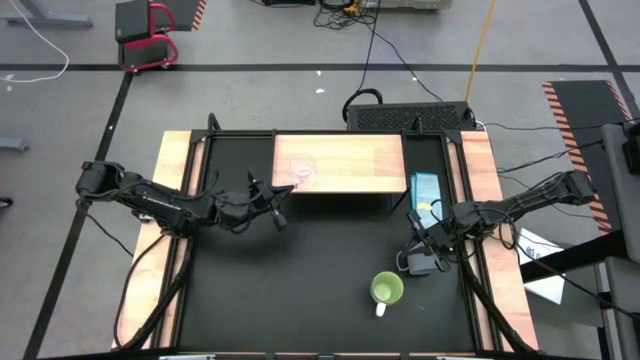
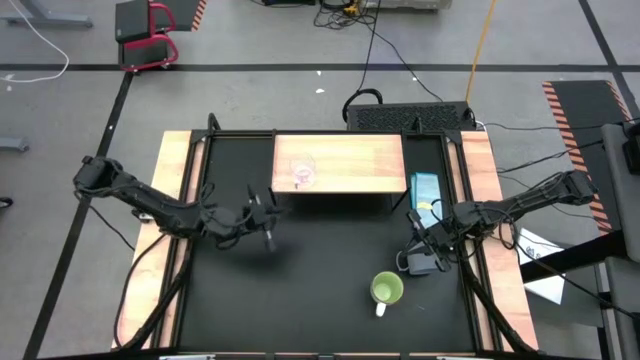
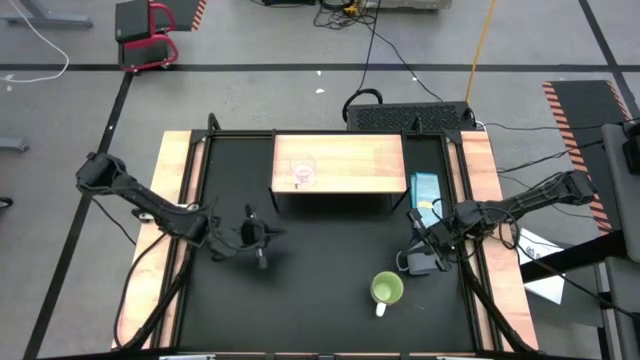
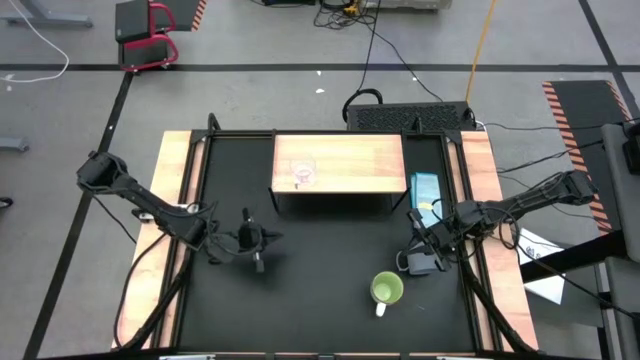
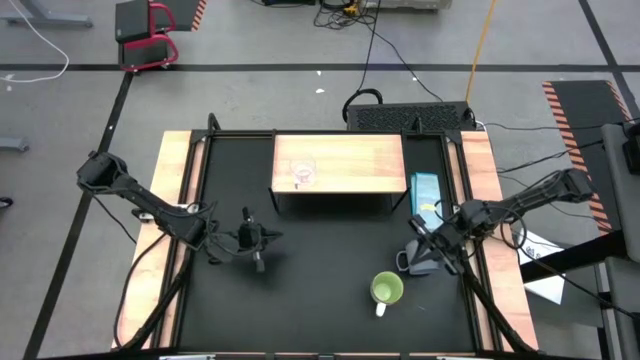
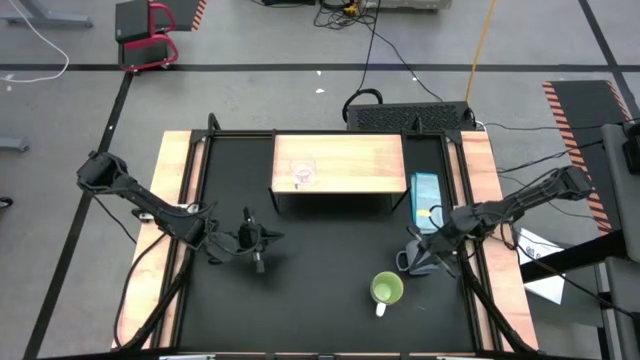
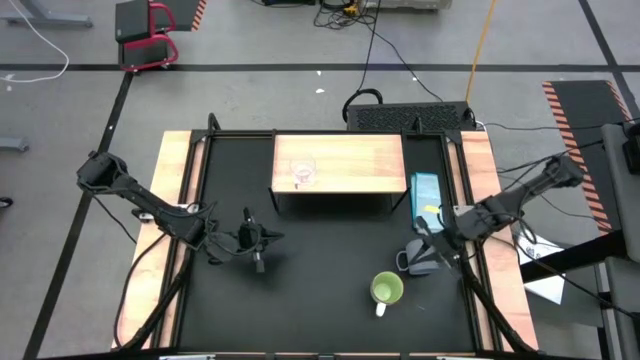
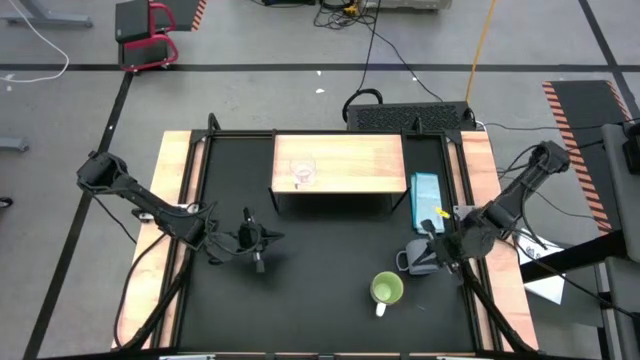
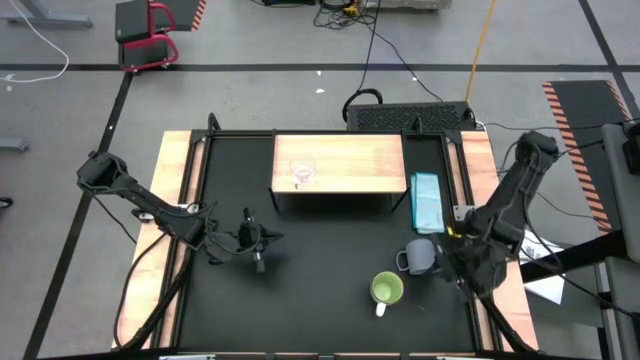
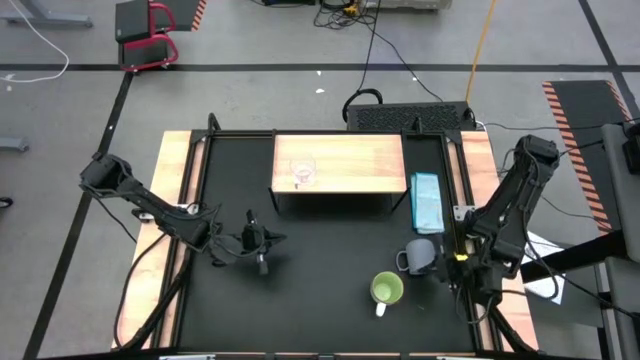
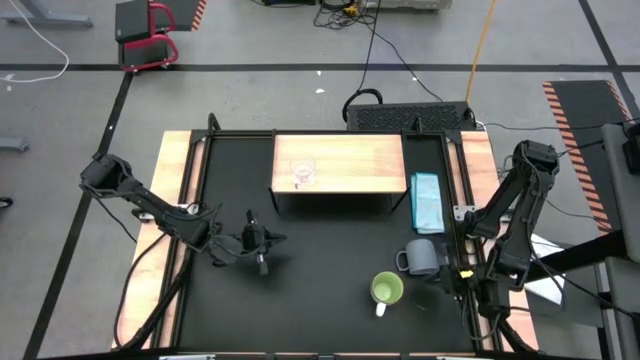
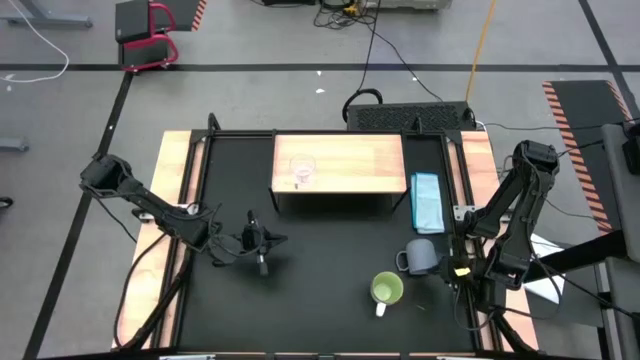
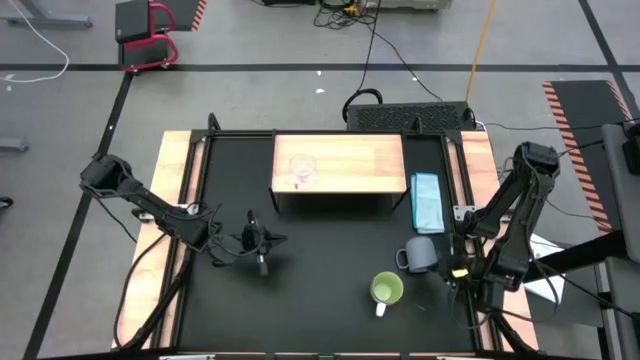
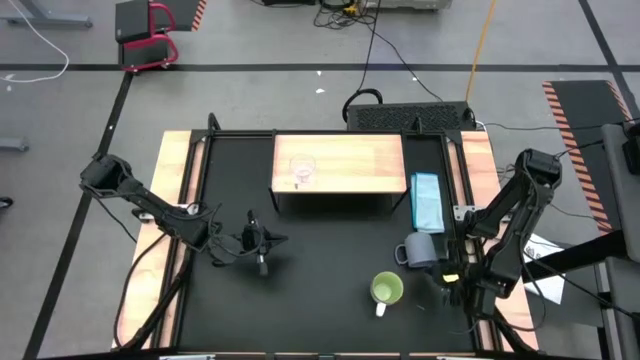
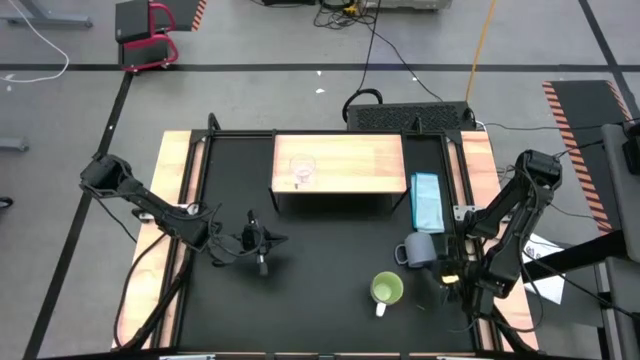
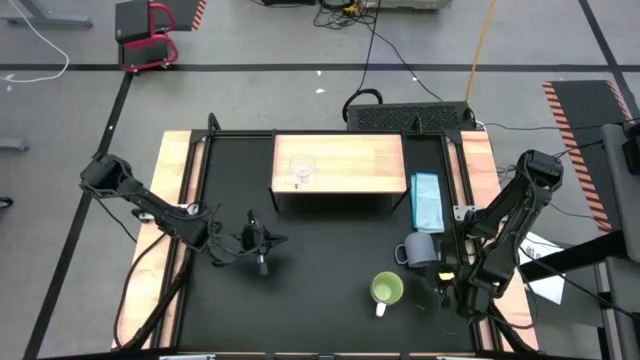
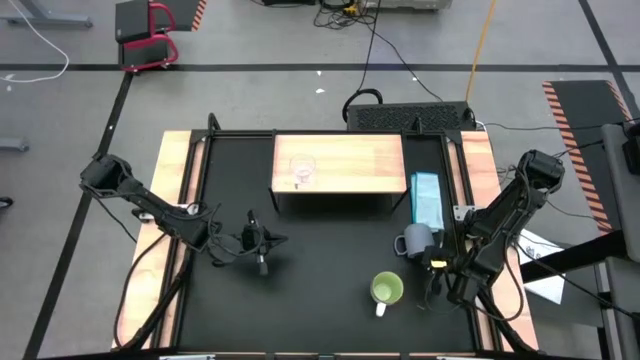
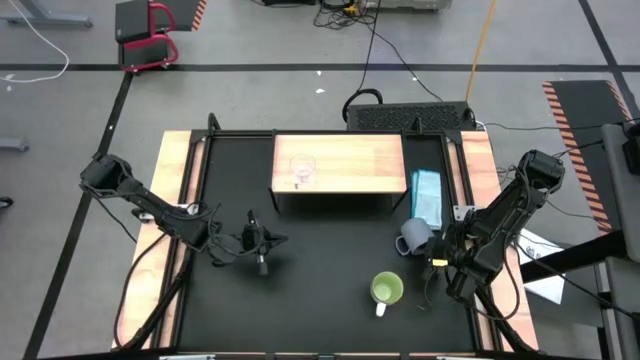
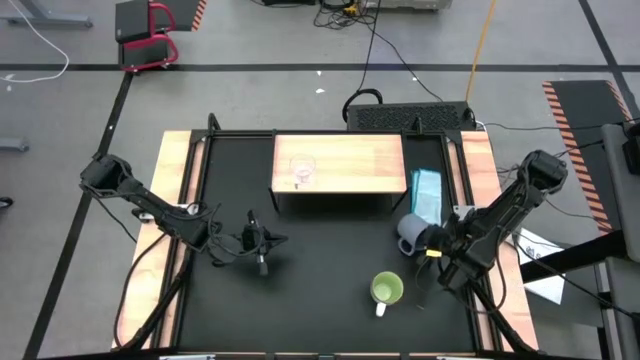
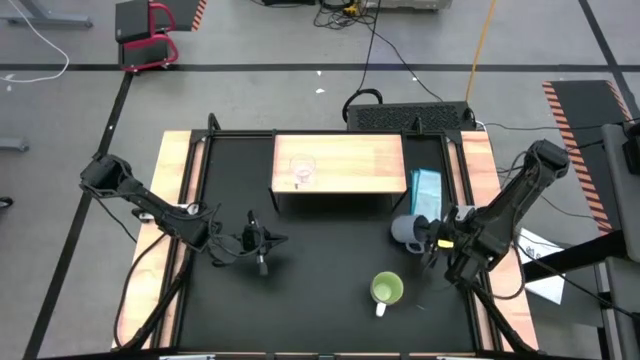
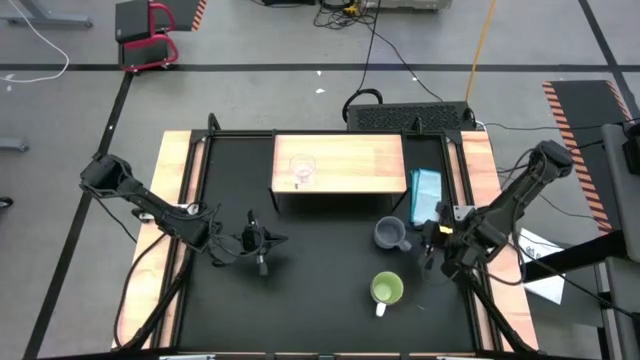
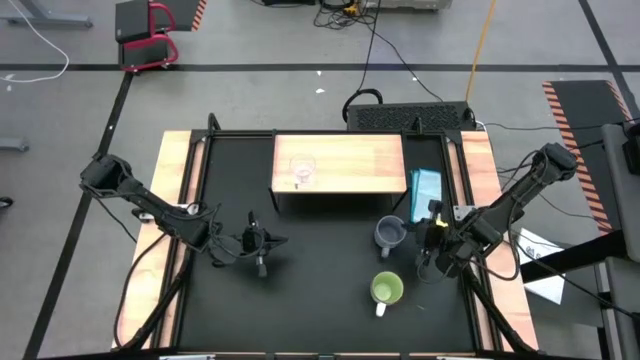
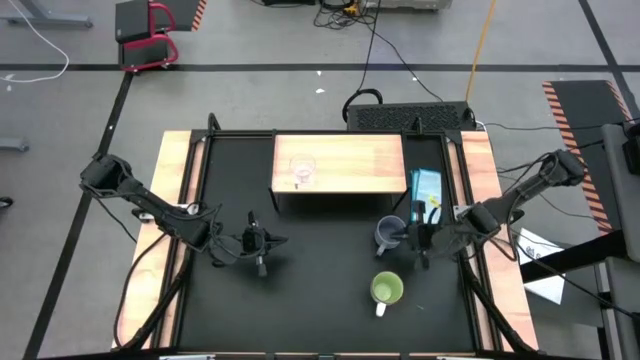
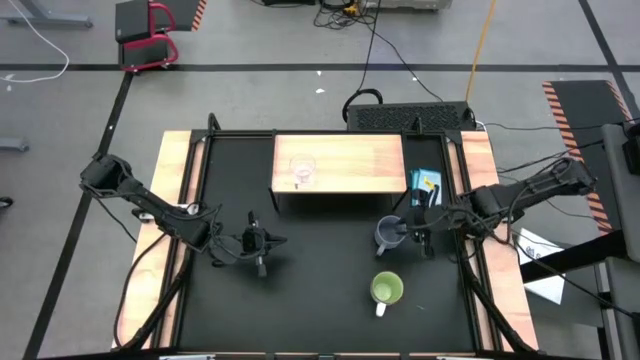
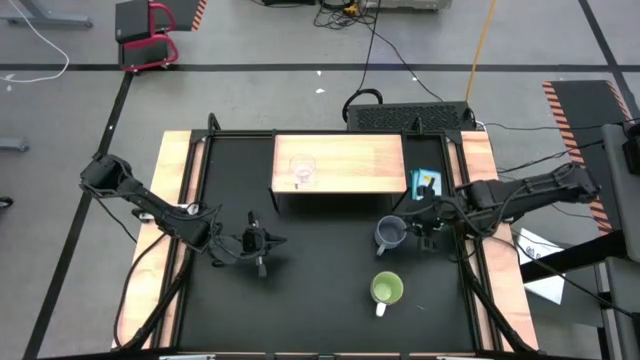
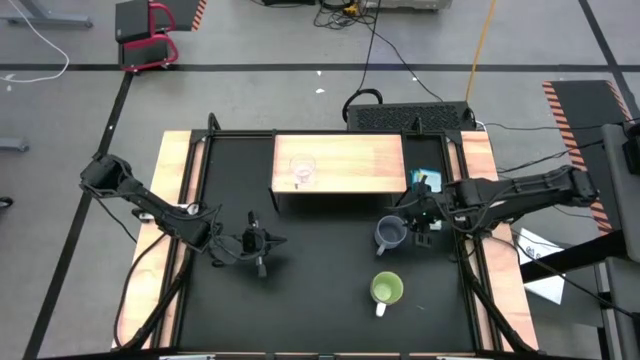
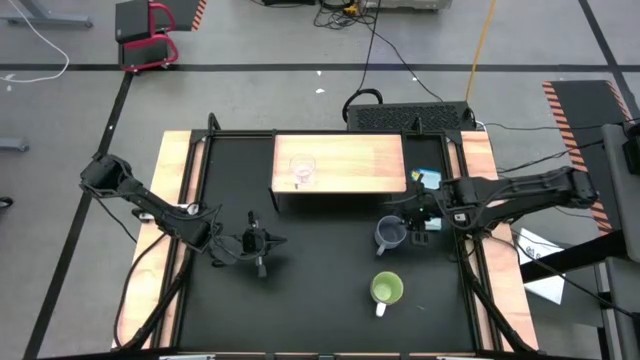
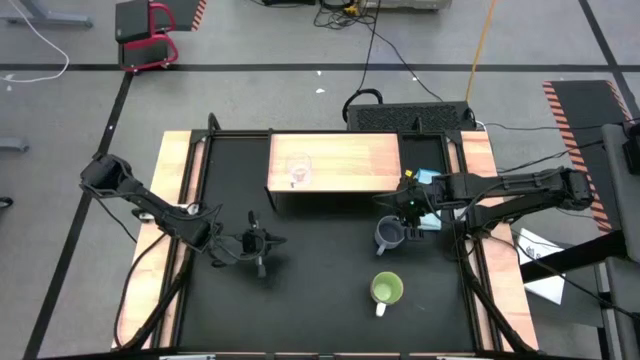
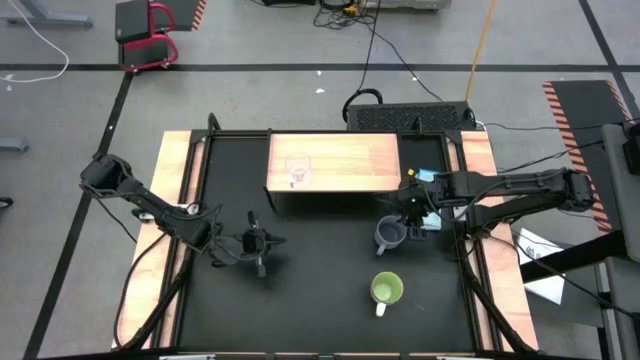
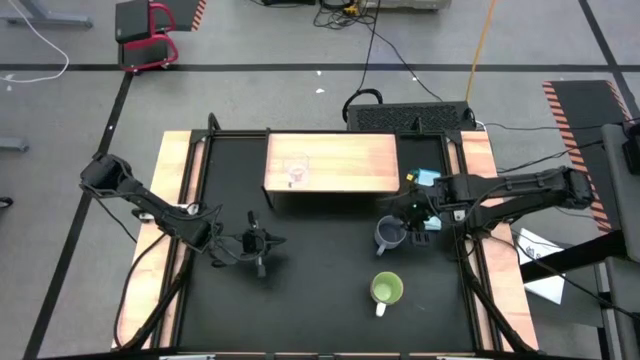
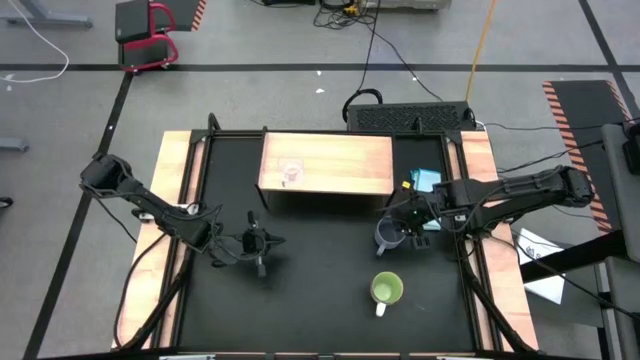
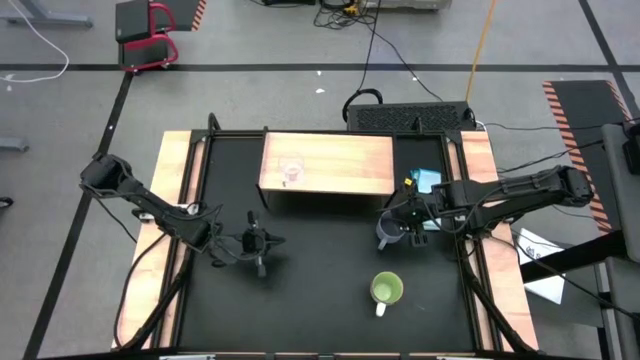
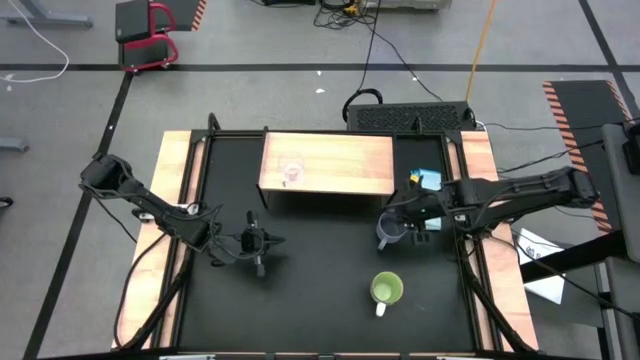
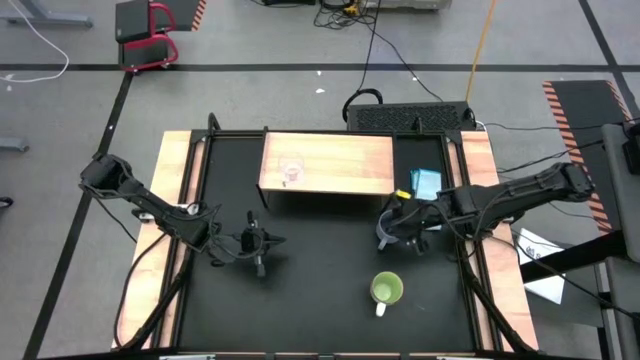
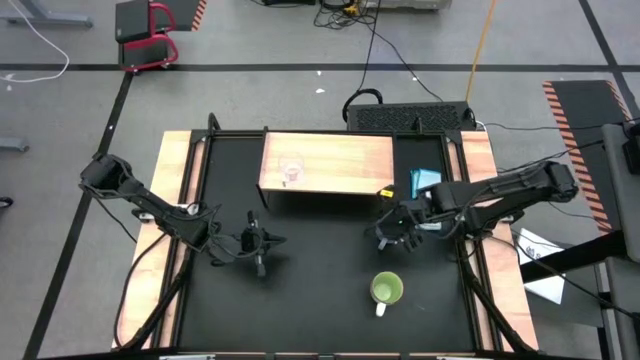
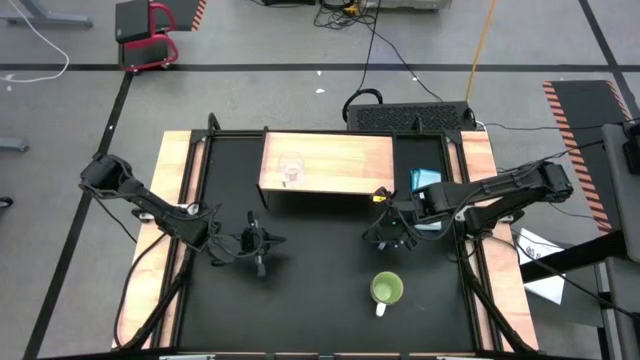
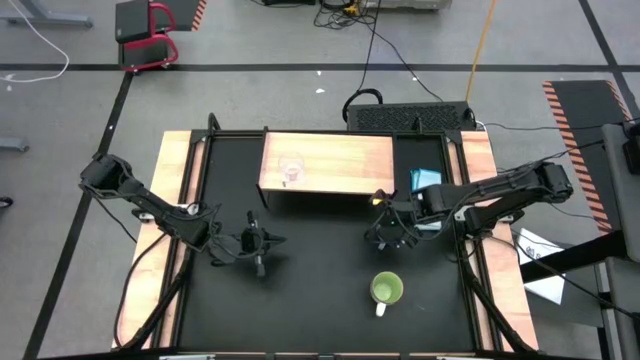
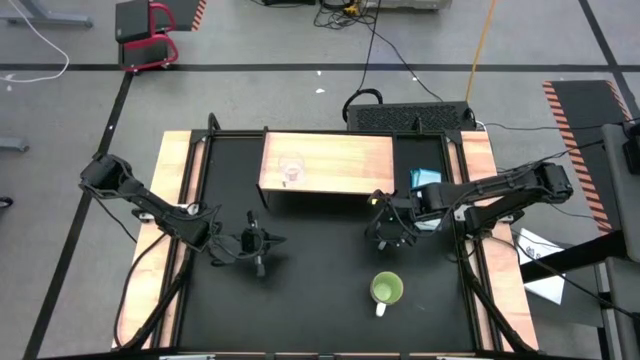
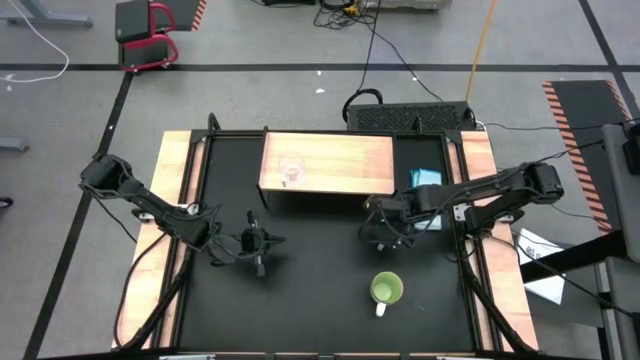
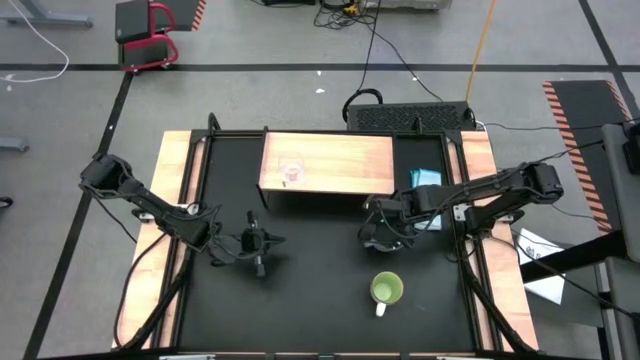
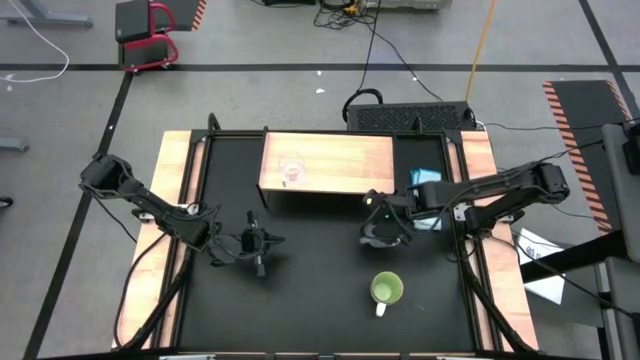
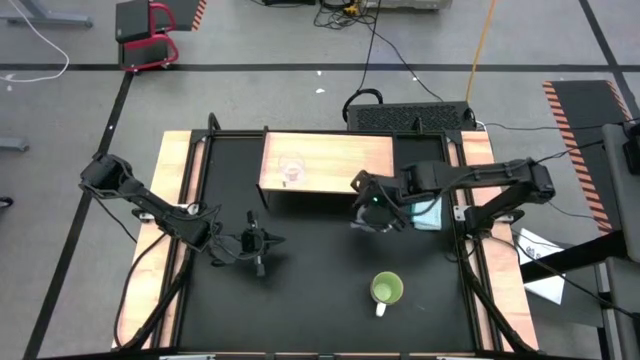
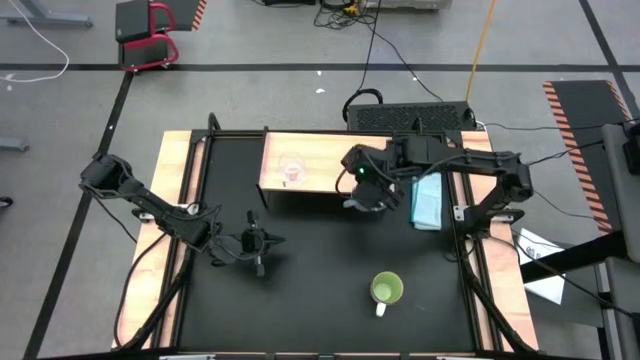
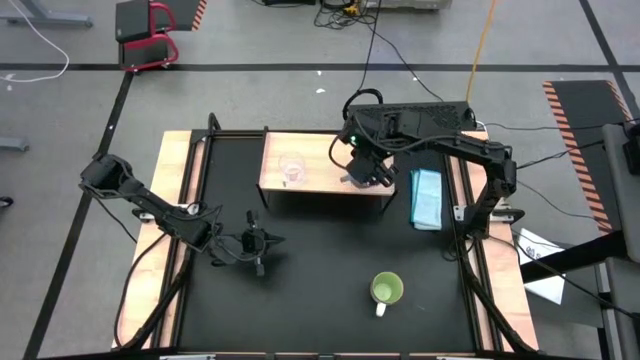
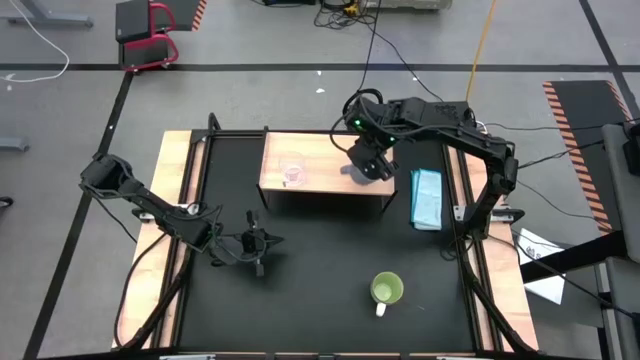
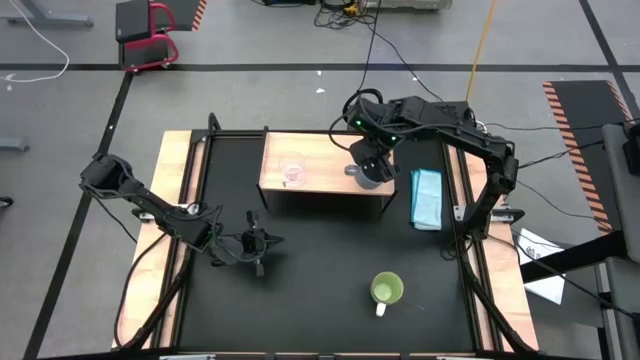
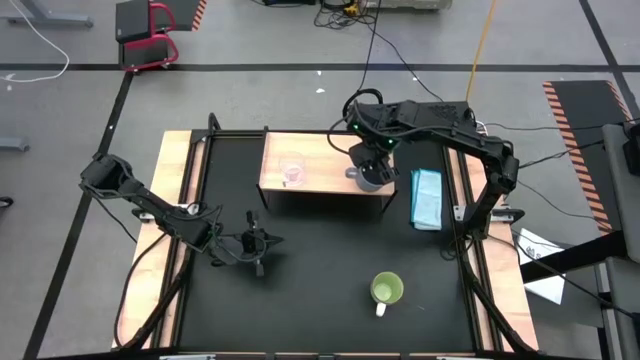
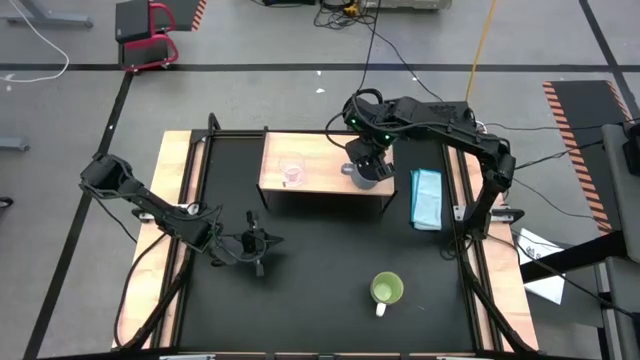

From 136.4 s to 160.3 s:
Task: Stack small to large cups/mugs on shelf
Put the gray mug on the shelf
